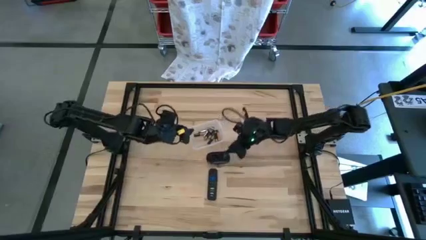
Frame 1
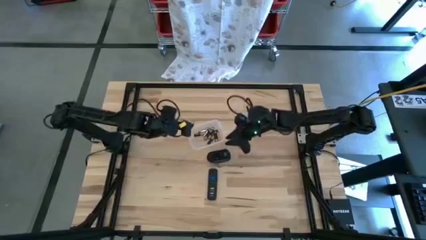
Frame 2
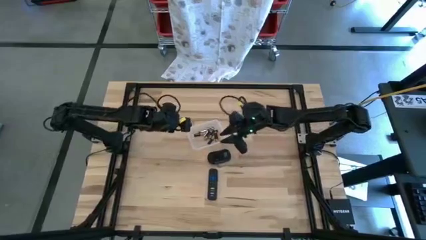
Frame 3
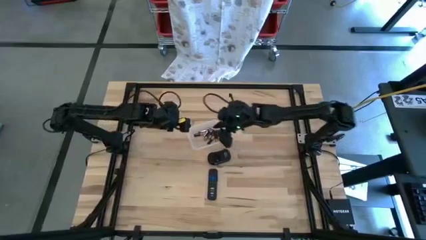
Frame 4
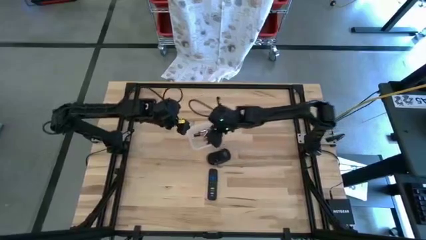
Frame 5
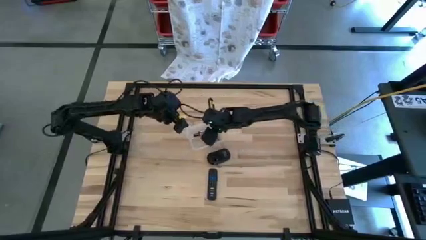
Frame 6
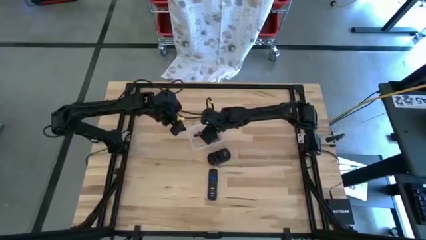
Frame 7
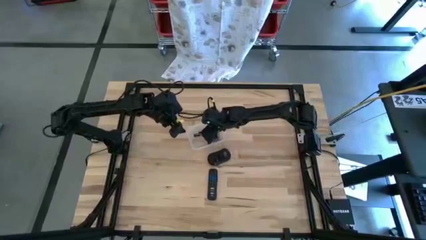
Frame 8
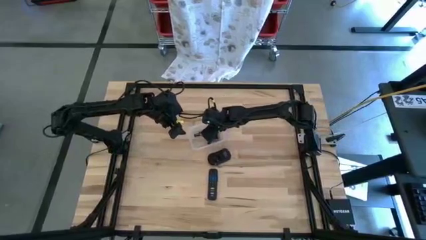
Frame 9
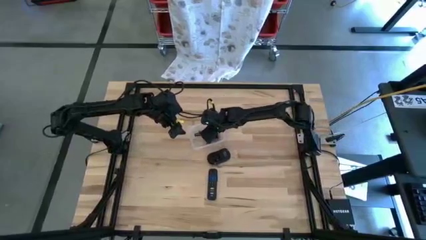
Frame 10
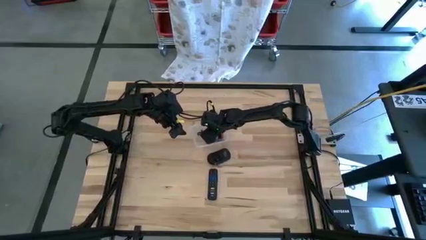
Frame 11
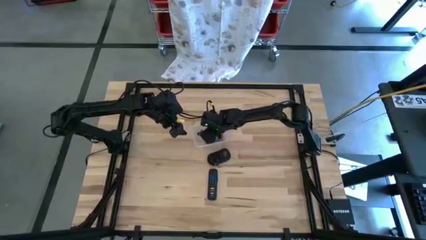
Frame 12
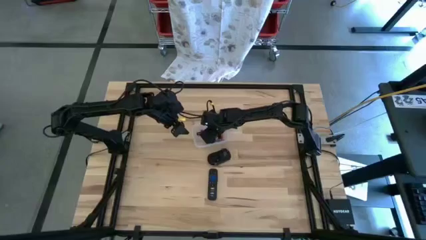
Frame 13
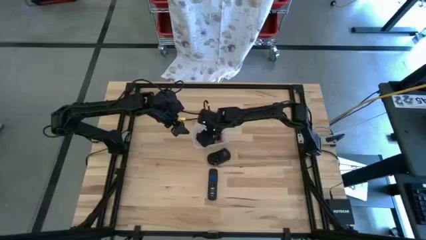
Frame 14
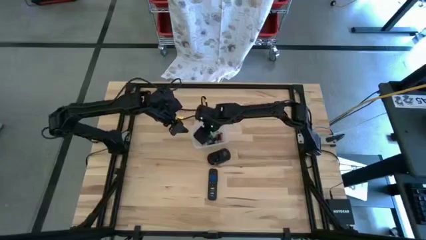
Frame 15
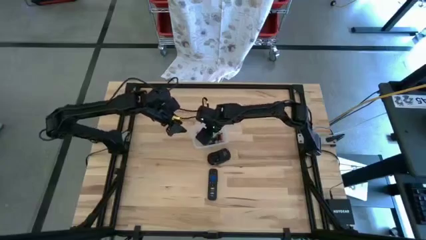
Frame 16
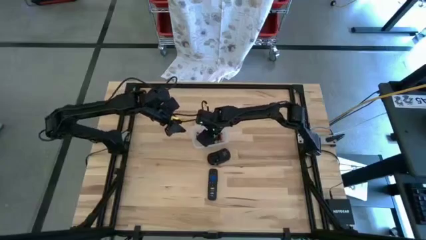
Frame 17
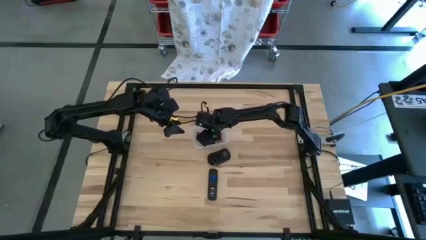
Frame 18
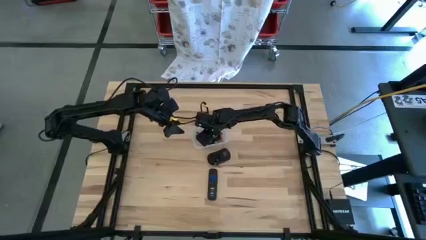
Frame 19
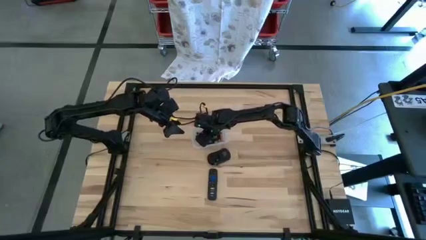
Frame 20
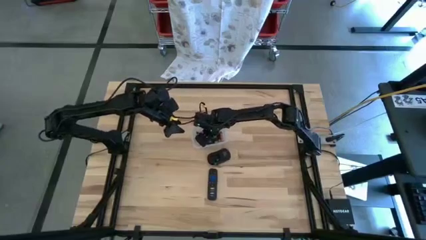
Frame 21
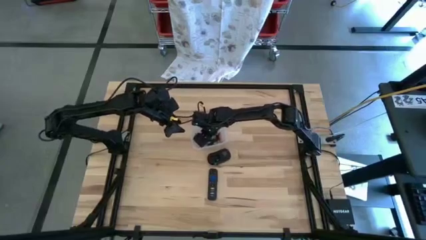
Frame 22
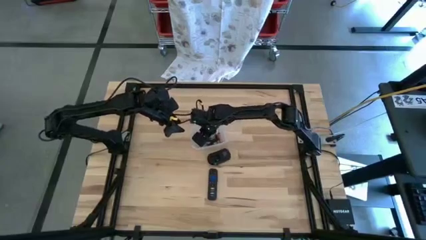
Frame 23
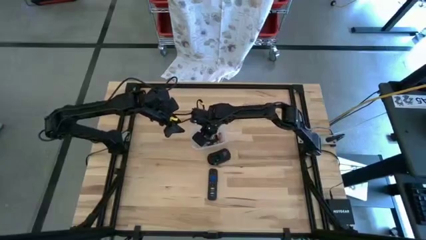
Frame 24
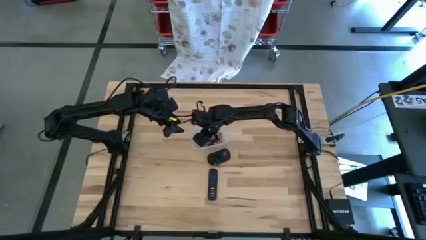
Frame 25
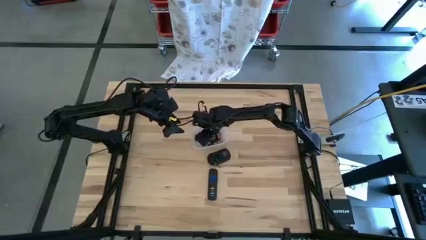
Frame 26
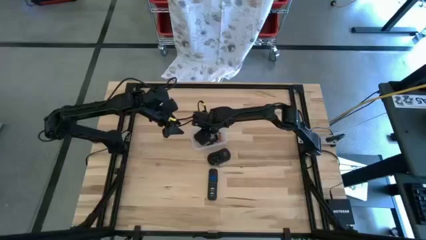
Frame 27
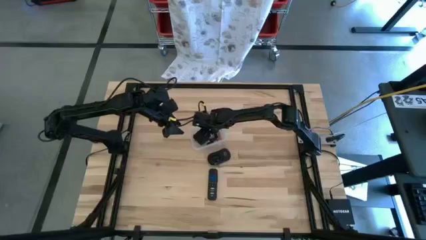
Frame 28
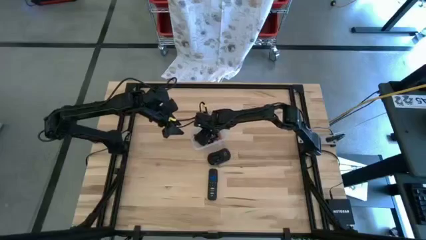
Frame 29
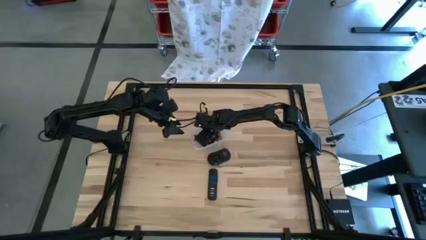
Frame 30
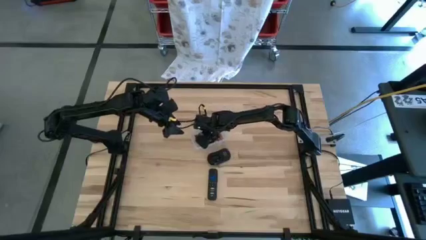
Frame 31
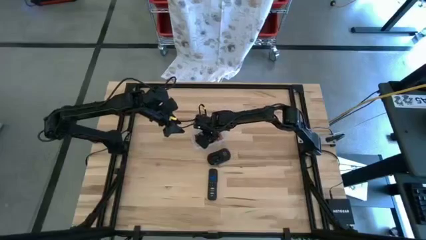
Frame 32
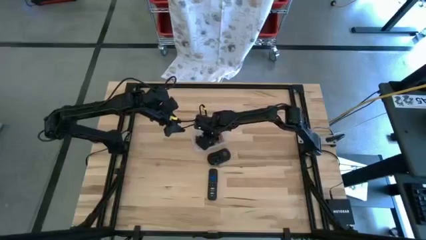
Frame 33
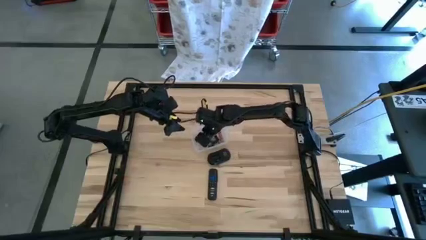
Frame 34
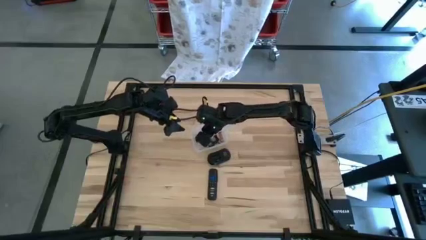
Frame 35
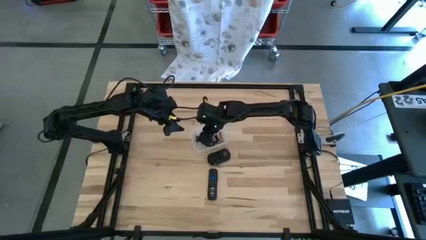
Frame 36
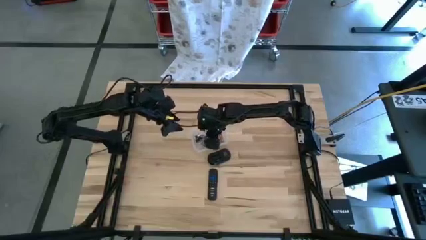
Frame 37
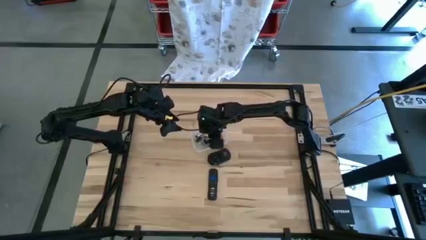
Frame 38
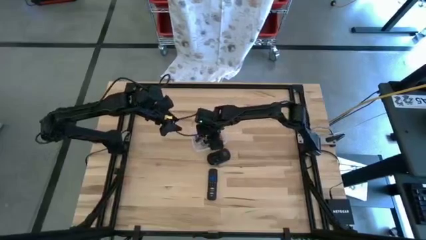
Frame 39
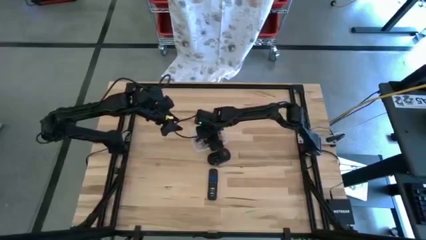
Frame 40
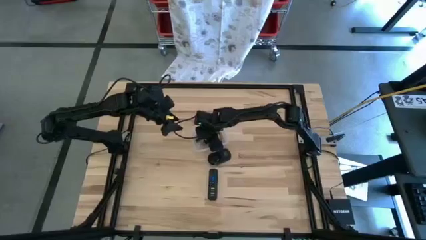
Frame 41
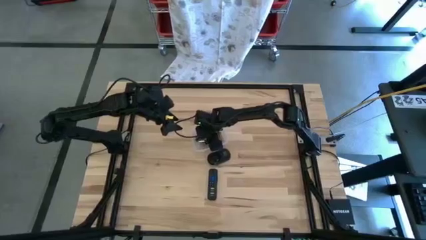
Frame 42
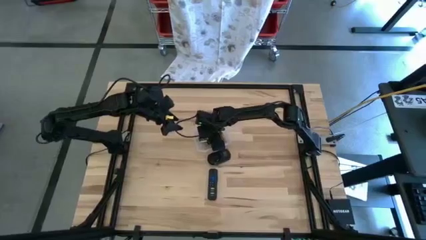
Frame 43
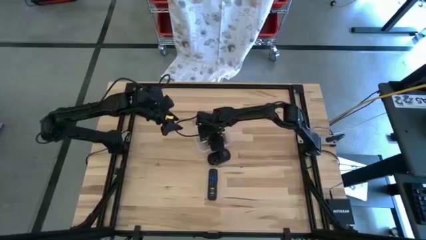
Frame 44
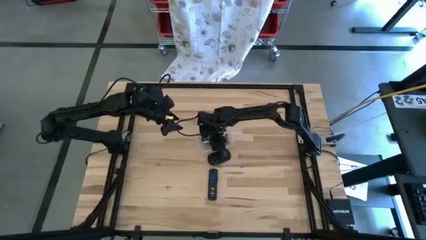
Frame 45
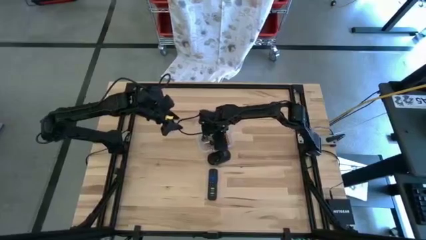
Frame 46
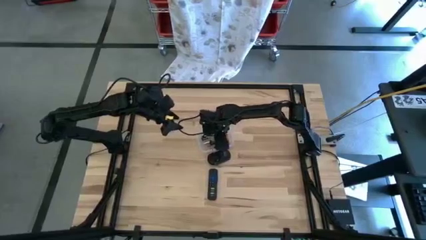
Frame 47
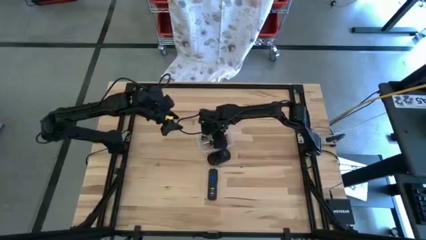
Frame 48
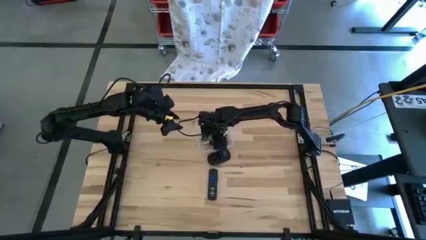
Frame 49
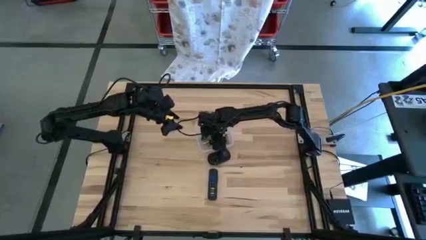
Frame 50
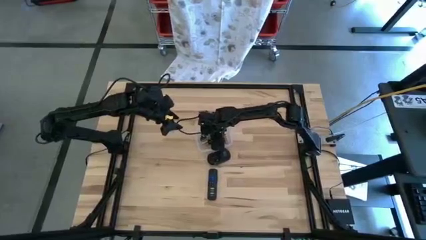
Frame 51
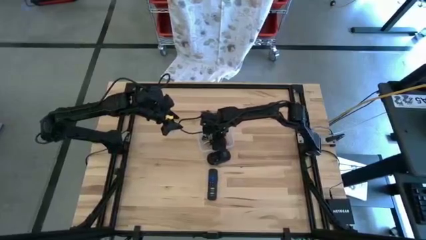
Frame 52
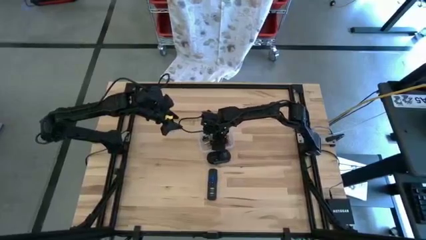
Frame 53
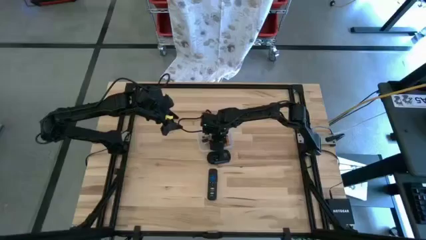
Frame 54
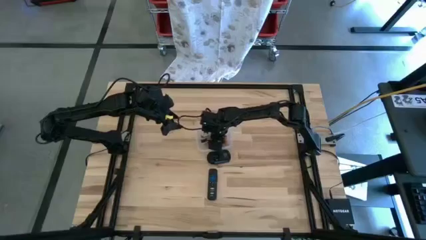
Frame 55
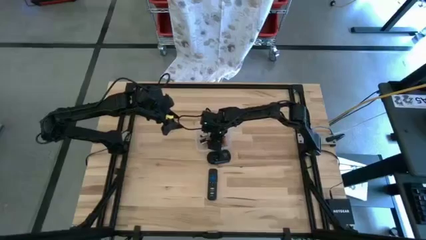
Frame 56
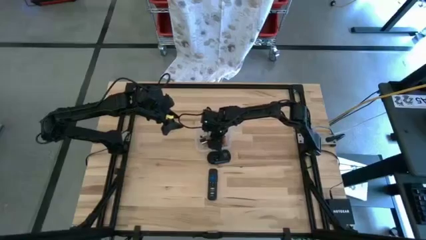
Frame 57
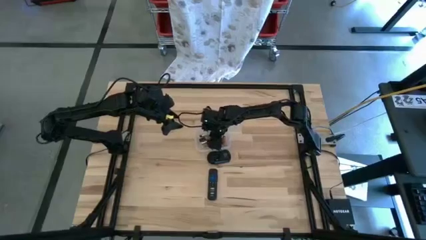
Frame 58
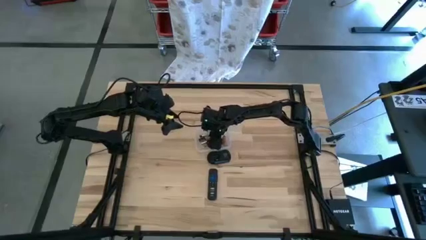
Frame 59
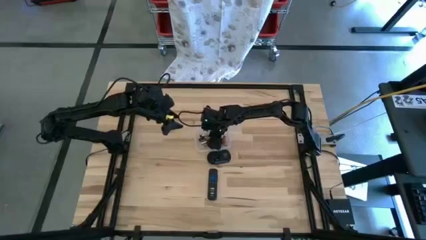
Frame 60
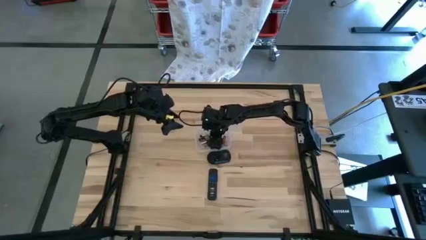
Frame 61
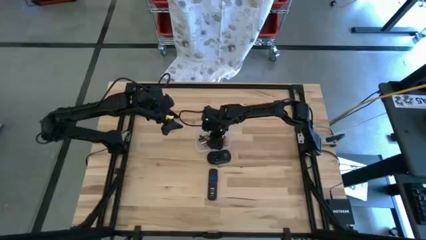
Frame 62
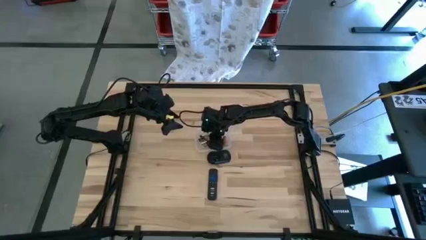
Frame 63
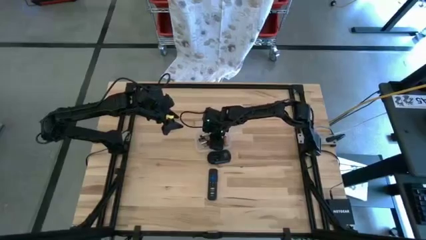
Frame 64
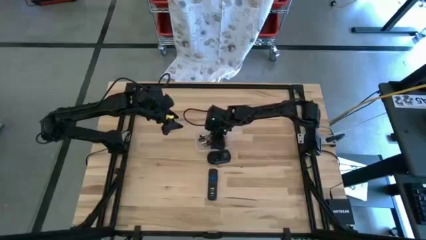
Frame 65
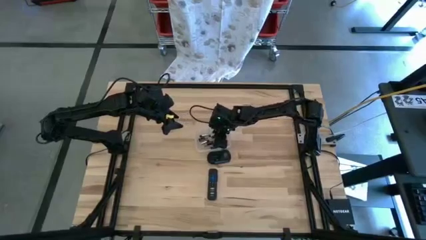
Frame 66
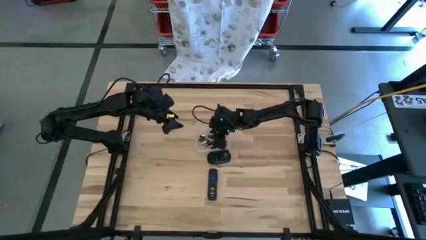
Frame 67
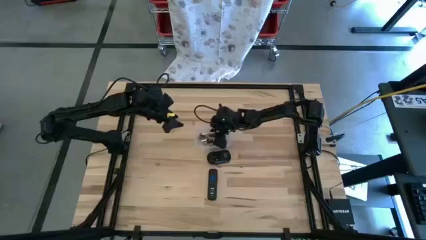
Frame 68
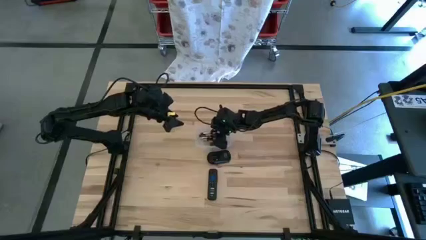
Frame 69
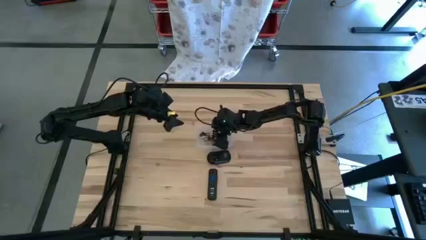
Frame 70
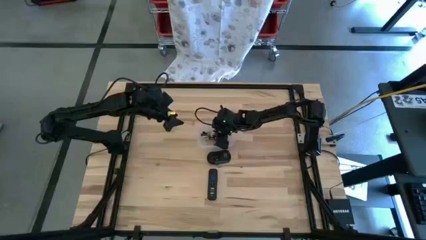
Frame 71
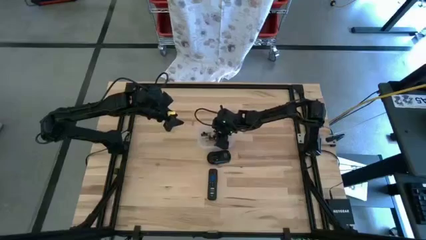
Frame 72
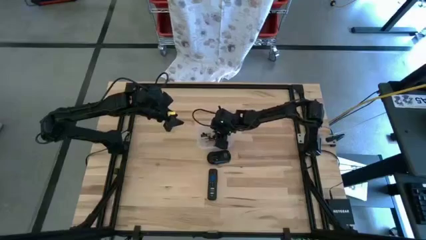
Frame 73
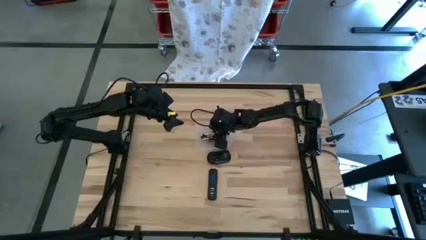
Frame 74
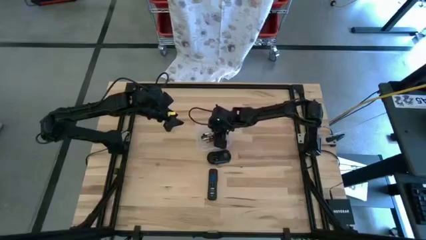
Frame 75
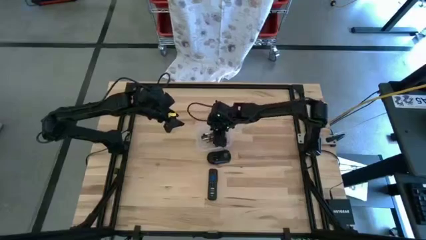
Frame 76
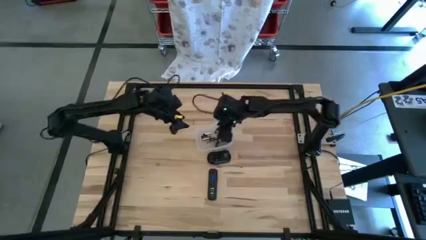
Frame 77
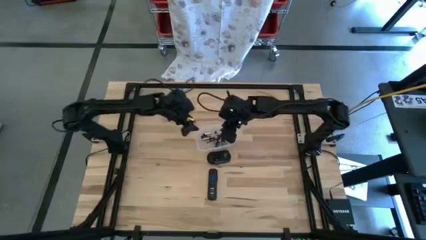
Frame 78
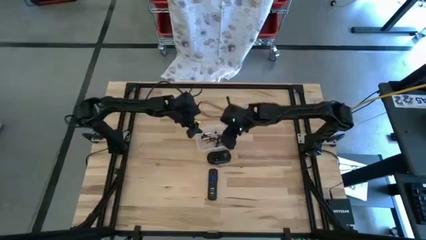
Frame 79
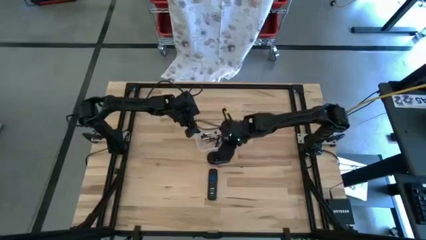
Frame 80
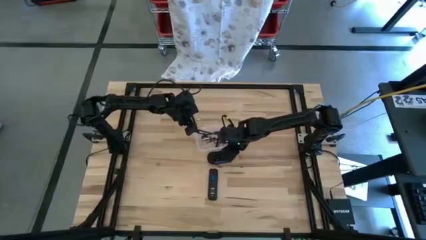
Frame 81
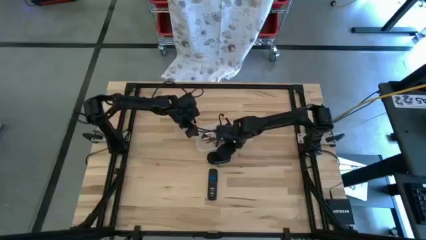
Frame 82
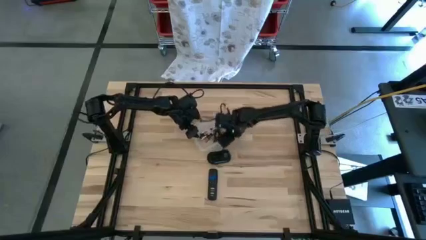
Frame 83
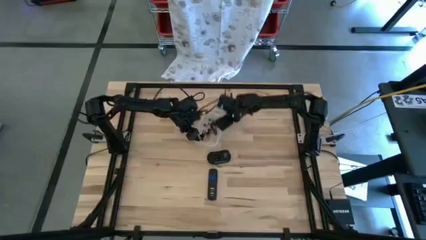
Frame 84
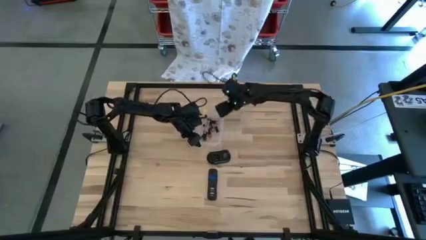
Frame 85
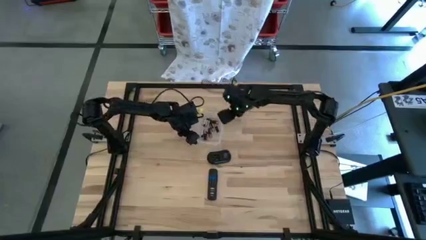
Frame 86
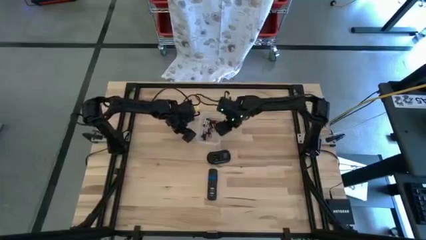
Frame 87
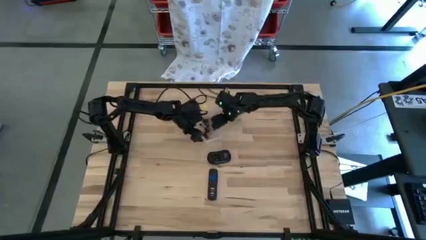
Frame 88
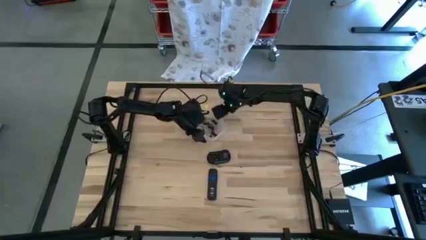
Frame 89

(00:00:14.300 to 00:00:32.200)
Task: Insert battery
Insert the silver battery into the mouse
